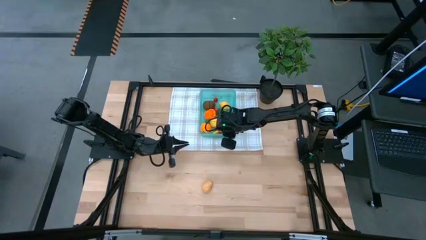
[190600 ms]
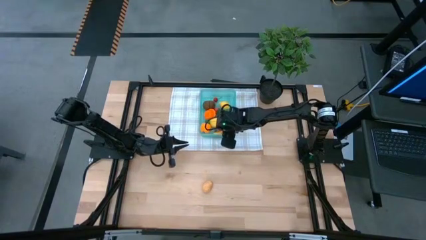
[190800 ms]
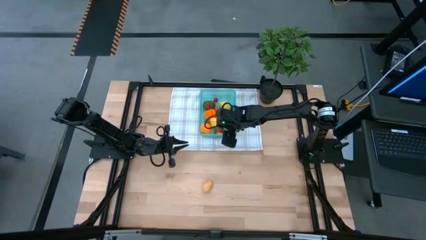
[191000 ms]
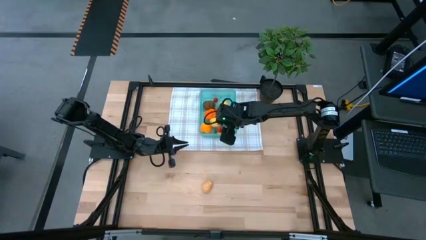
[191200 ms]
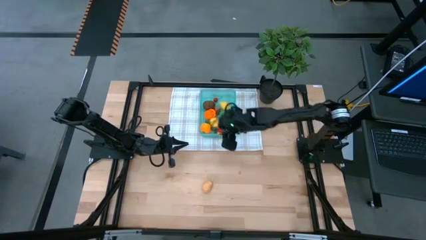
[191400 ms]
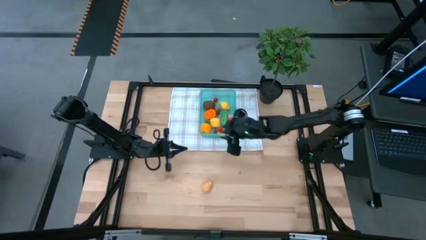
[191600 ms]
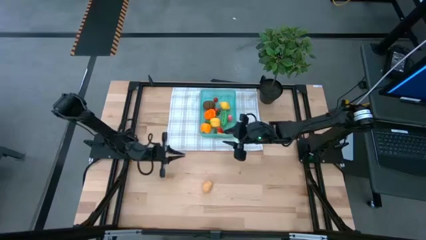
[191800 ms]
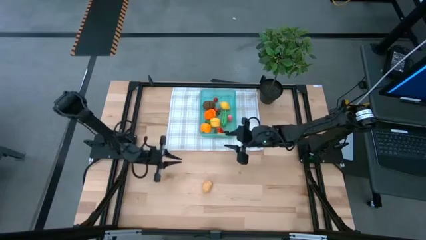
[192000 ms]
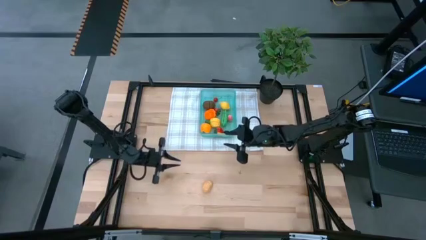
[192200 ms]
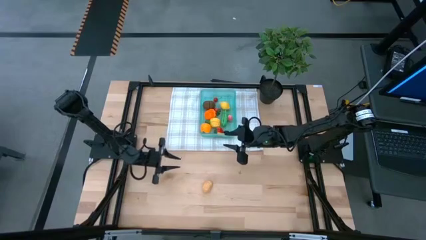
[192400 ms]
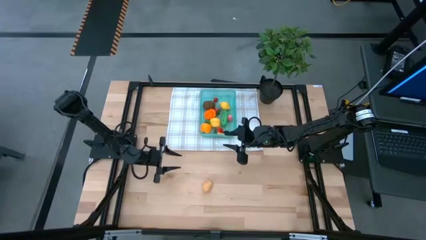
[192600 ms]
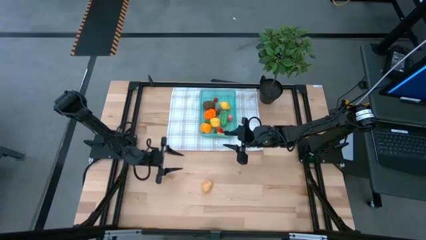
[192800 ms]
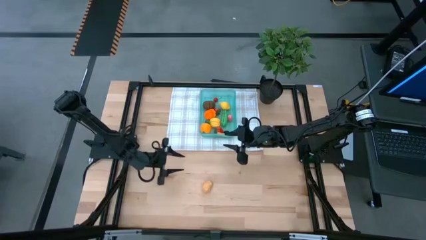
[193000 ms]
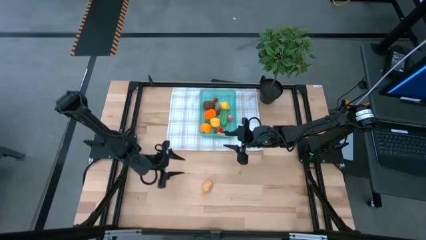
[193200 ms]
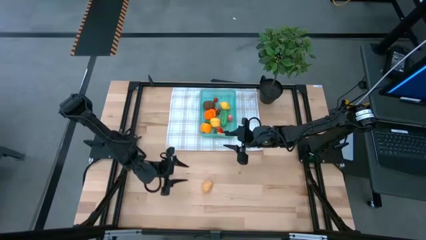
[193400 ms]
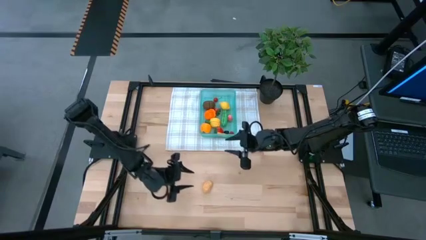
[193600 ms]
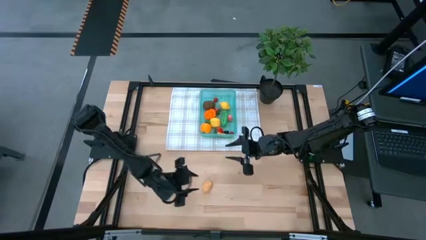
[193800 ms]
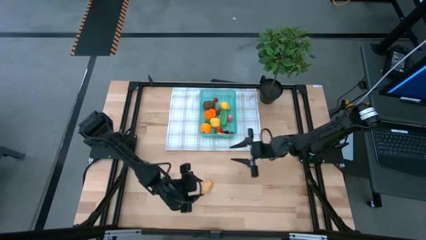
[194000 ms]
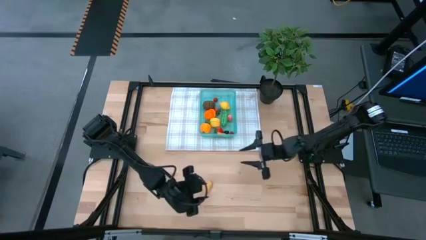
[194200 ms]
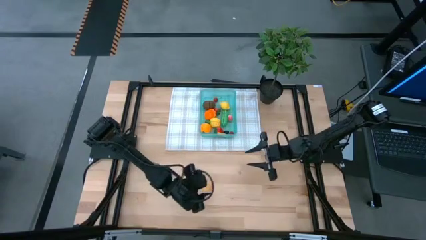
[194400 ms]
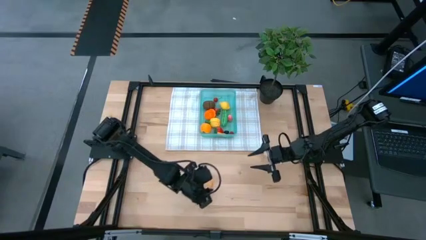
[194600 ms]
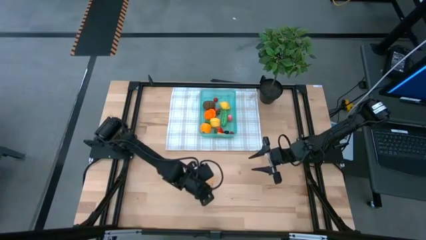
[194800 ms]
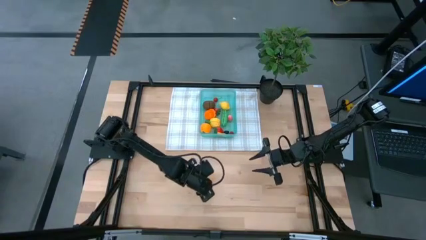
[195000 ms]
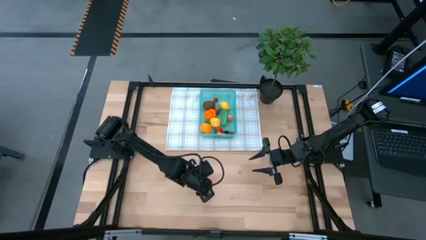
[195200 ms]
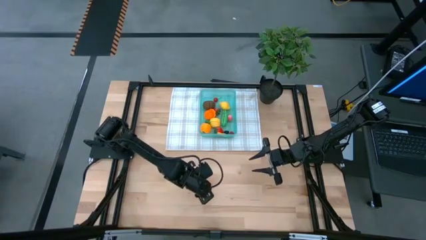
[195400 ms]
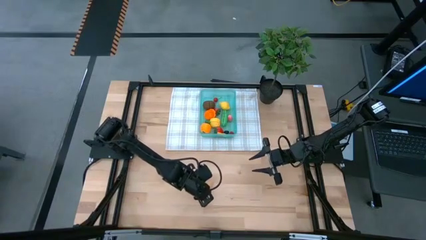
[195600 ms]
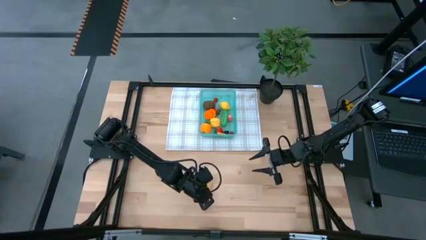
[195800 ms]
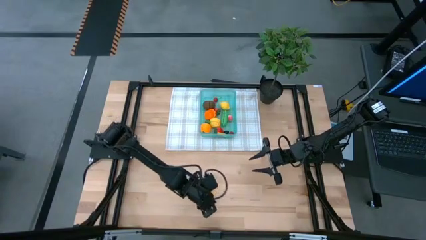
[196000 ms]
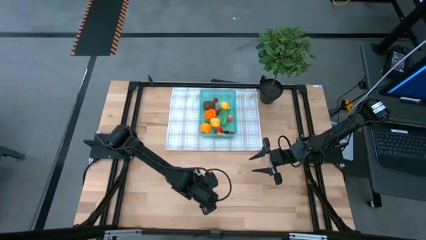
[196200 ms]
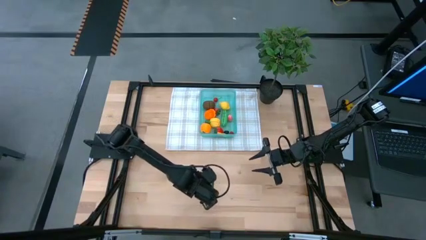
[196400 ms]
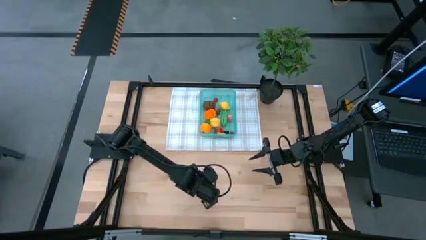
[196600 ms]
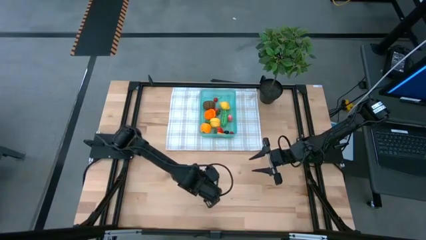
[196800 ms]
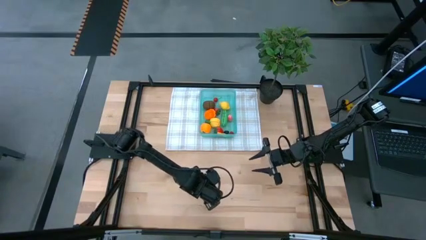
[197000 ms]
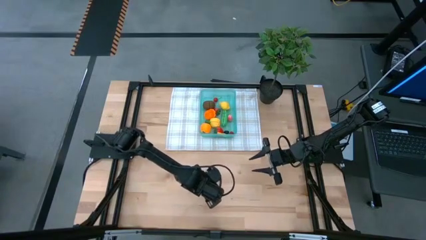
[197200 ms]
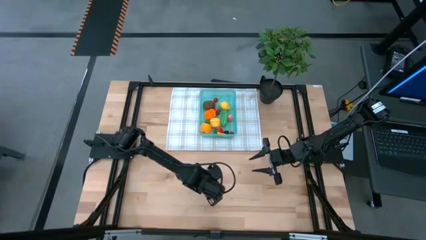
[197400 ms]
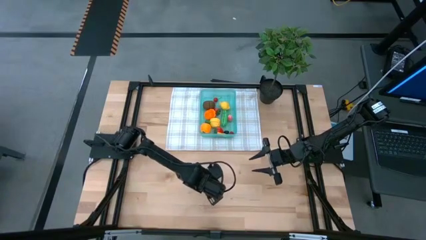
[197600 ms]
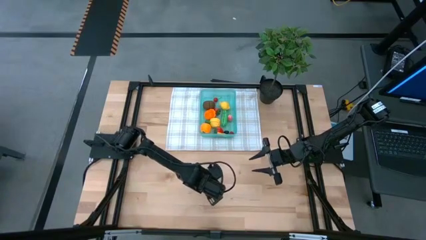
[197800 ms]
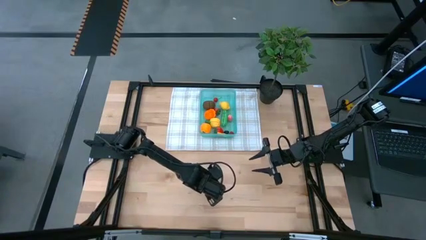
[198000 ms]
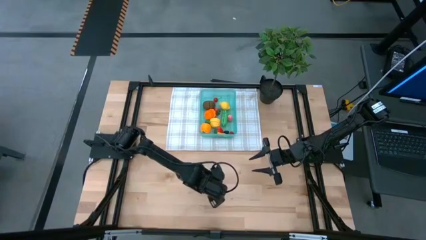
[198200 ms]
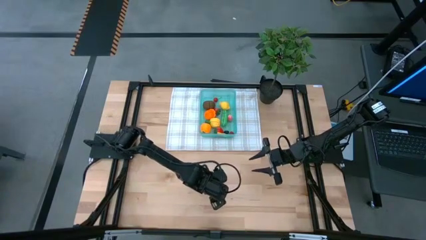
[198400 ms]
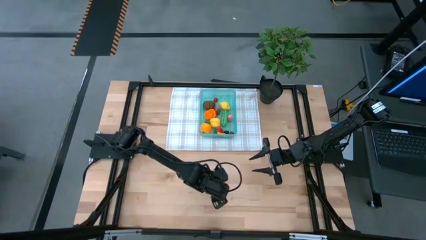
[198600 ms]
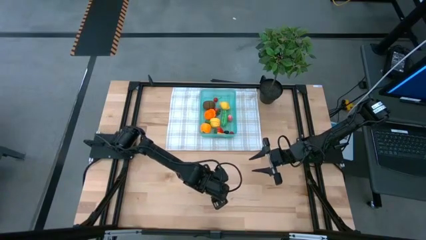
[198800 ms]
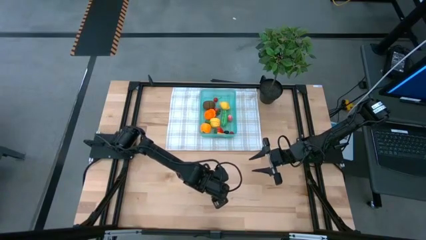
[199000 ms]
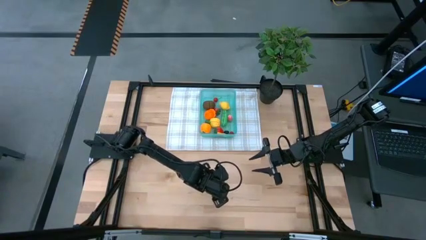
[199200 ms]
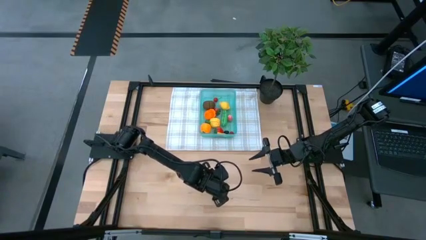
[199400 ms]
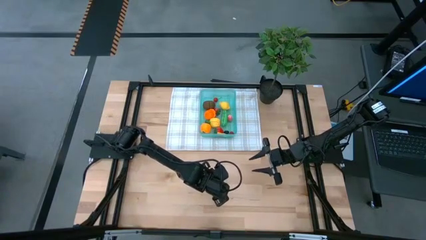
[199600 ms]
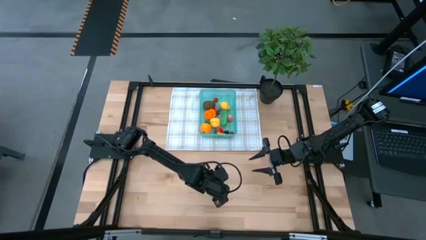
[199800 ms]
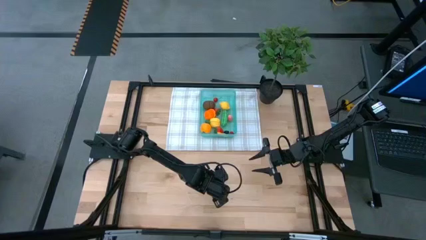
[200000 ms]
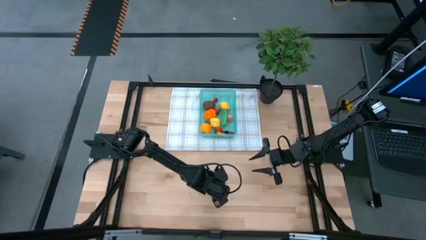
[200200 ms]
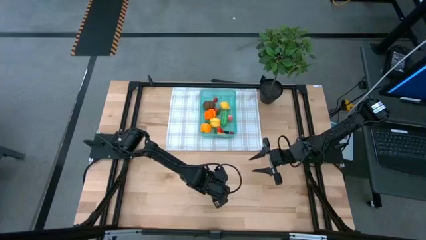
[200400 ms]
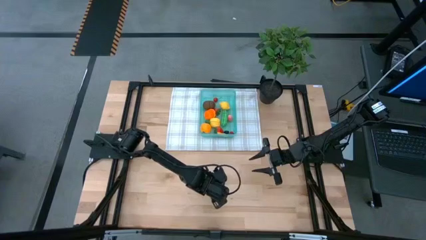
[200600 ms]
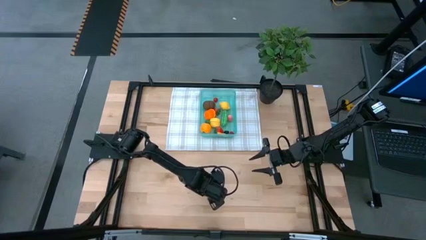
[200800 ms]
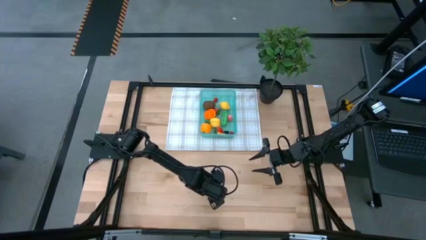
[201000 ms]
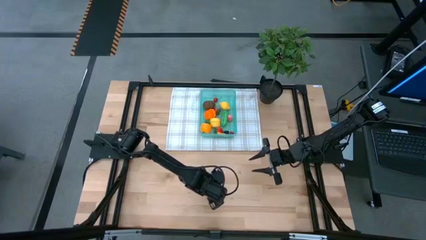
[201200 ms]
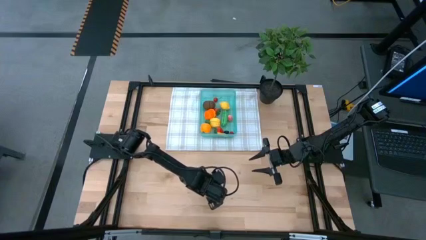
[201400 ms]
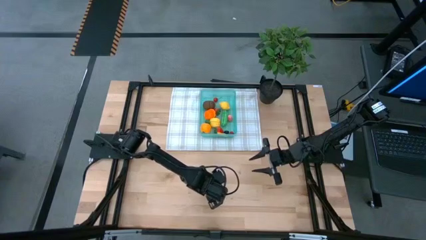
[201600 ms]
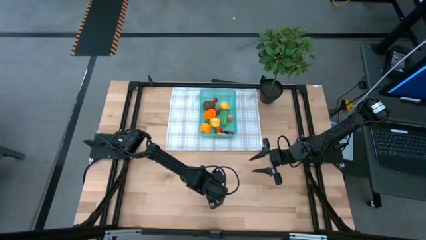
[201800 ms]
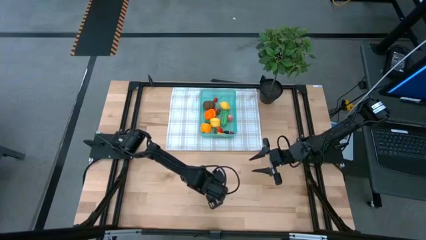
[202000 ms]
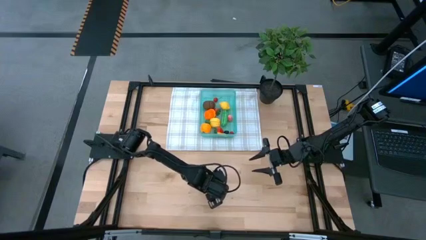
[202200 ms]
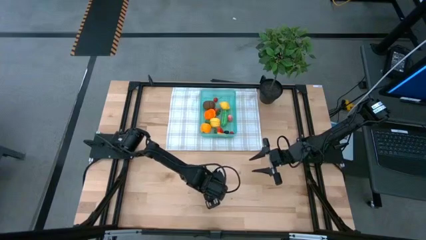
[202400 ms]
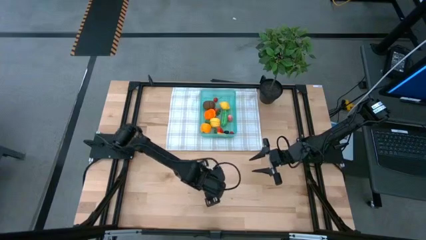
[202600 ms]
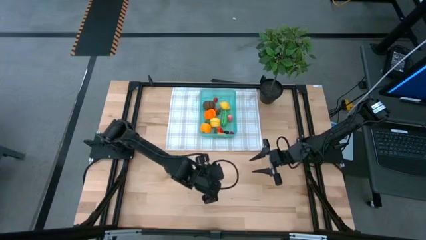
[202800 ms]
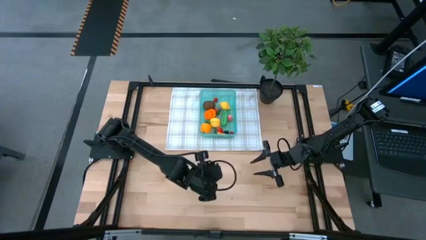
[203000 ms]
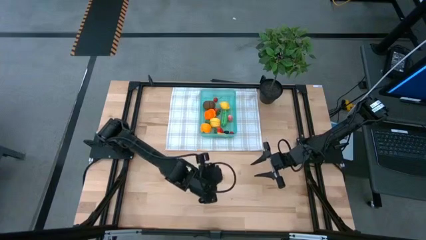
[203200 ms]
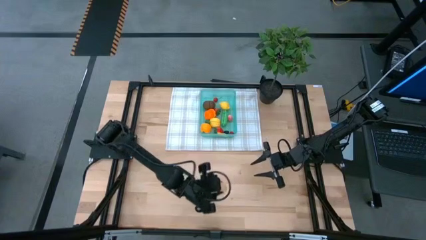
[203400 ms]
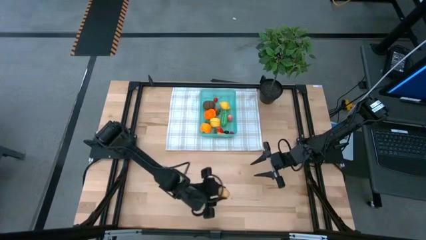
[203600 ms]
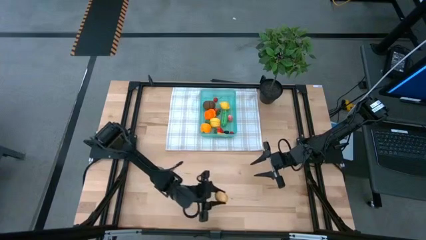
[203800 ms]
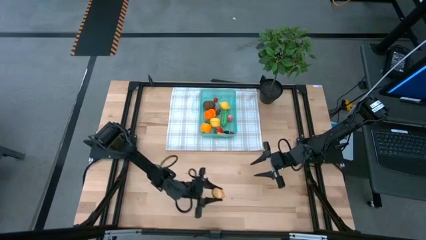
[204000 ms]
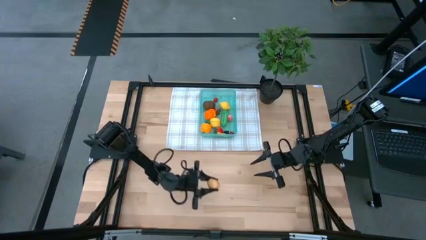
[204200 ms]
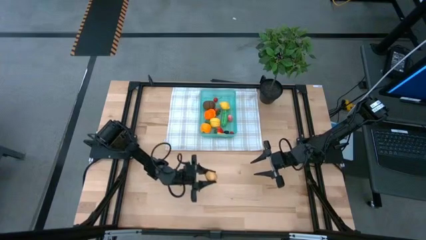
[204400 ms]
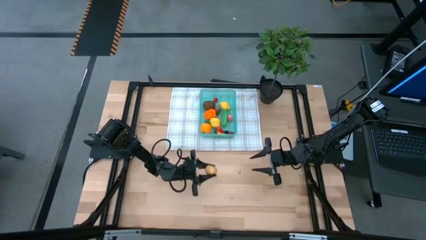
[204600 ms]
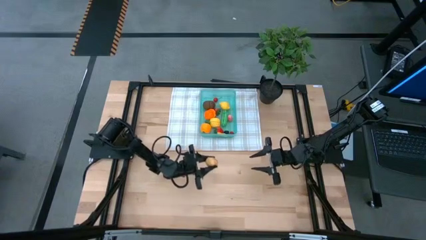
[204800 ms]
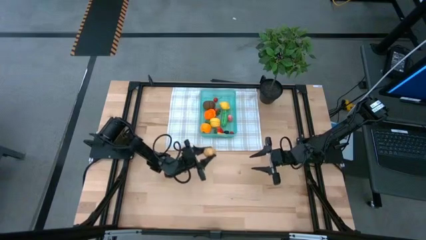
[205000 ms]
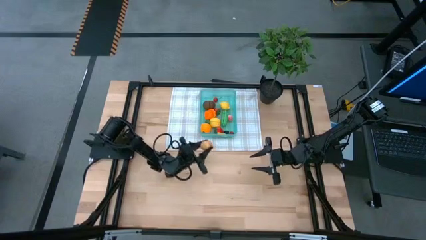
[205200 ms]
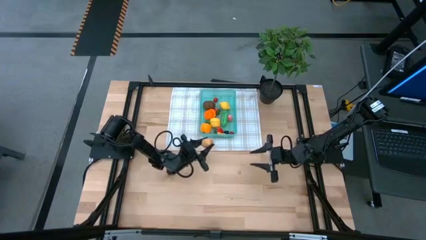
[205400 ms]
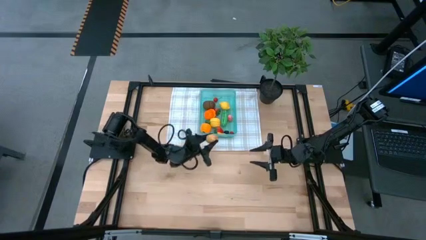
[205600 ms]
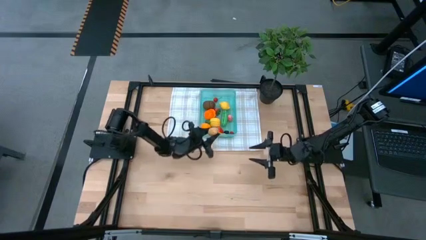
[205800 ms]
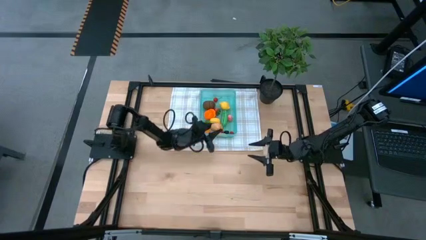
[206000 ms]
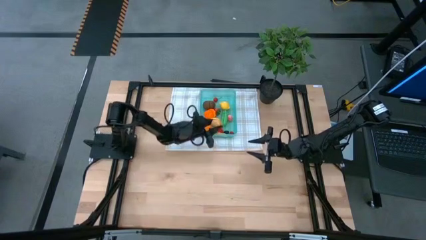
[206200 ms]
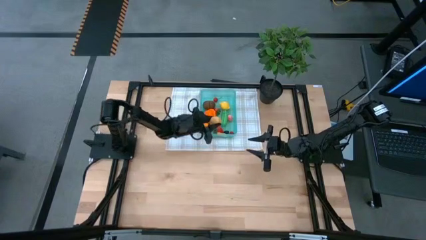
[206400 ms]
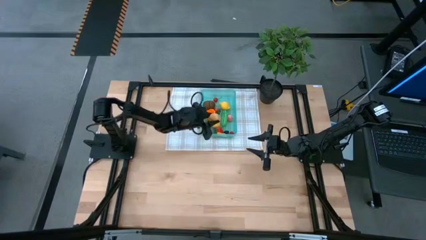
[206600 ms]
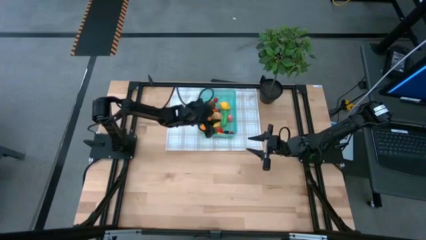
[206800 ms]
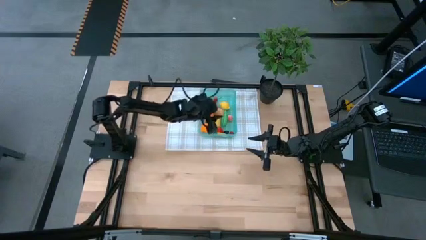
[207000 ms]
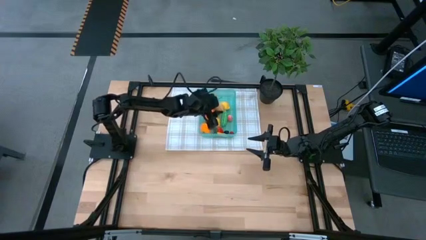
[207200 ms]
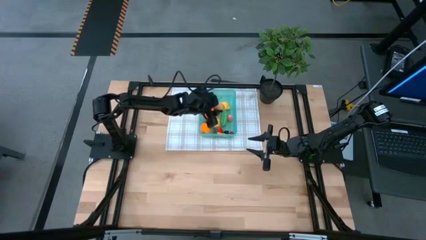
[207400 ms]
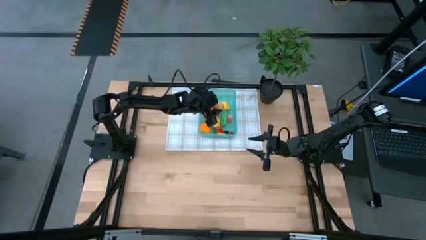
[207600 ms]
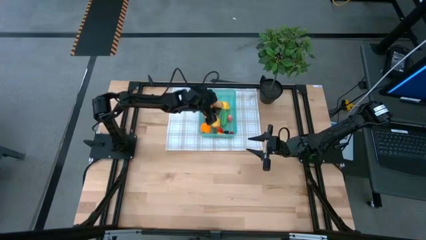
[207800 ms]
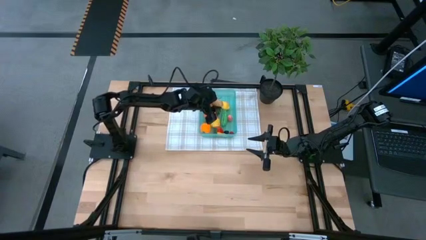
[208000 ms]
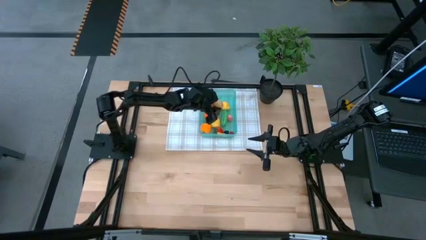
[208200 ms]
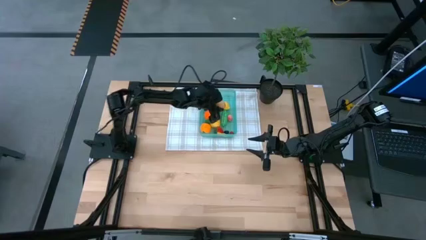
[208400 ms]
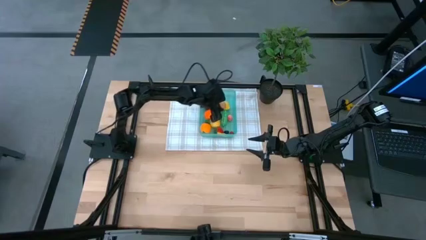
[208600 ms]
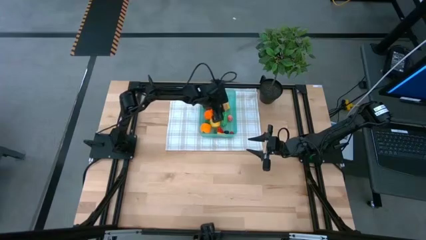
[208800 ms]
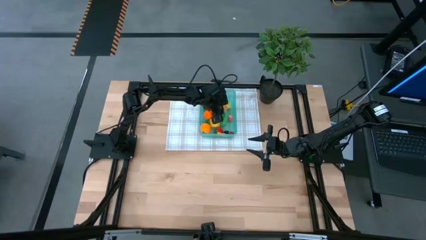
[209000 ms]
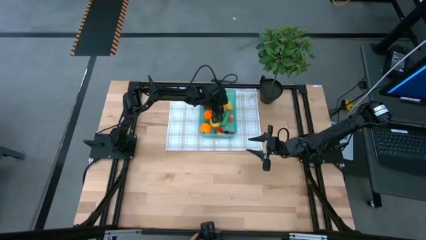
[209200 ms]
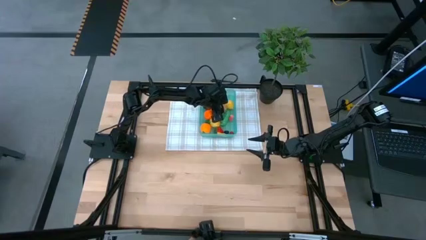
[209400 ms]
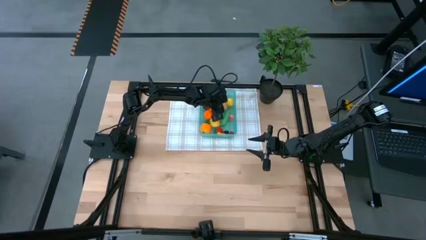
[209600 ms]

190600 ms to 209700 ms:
Task: Pick and placing Produce into tupperware
Put the brown potato into the green bin
